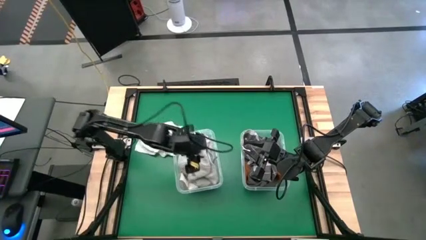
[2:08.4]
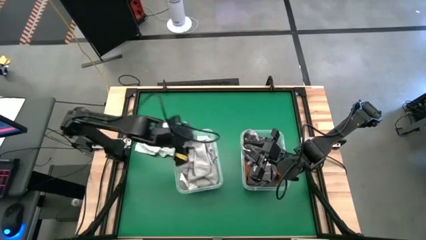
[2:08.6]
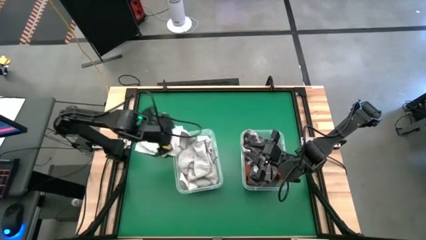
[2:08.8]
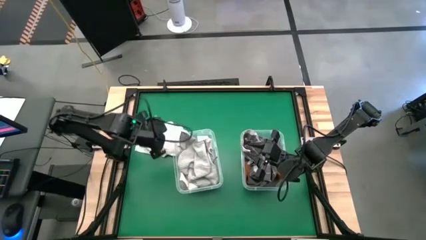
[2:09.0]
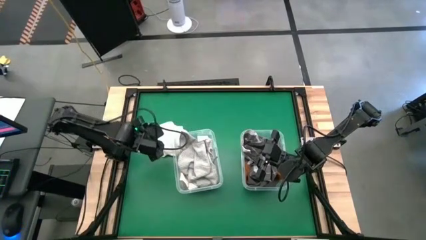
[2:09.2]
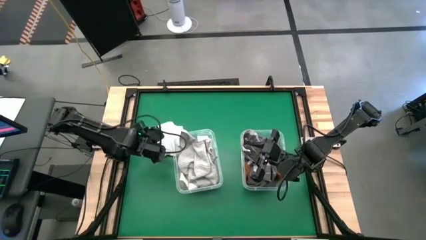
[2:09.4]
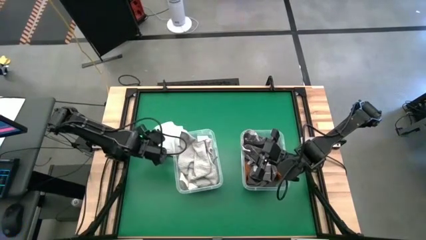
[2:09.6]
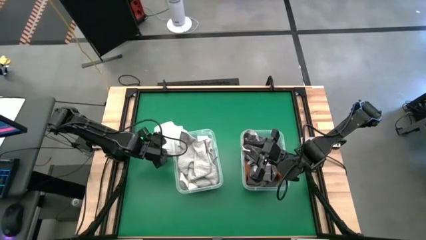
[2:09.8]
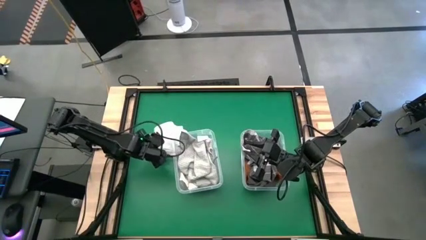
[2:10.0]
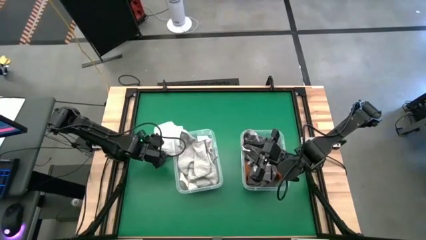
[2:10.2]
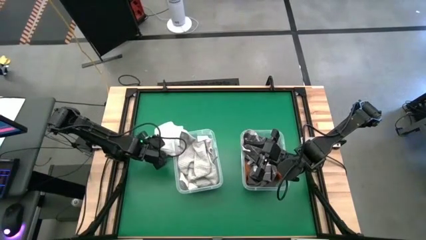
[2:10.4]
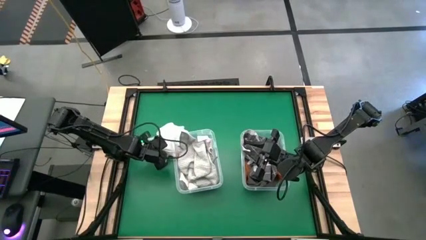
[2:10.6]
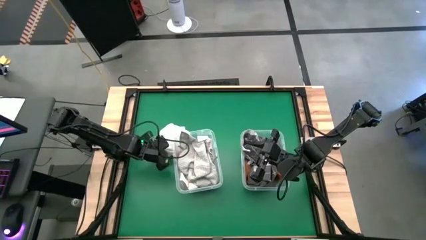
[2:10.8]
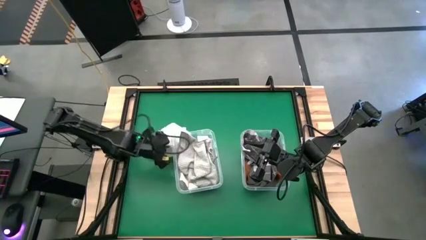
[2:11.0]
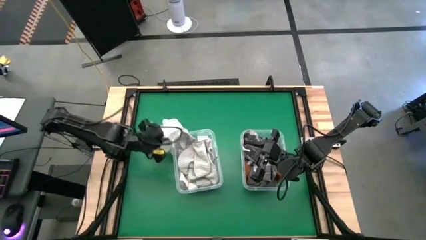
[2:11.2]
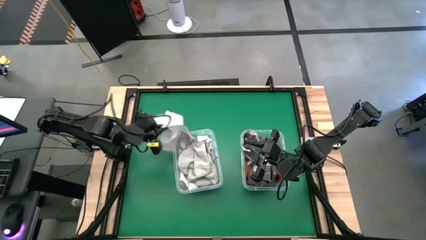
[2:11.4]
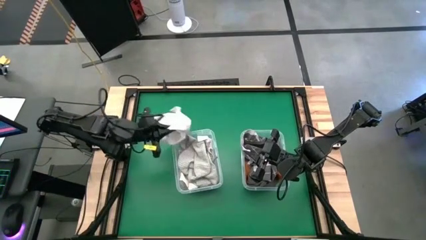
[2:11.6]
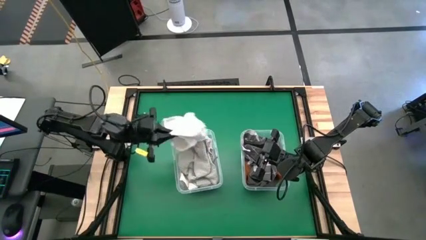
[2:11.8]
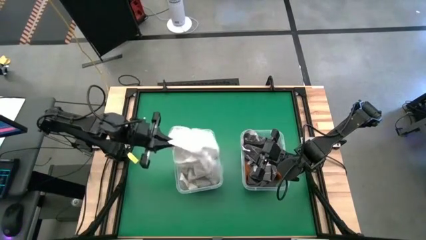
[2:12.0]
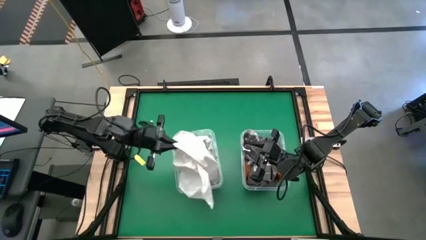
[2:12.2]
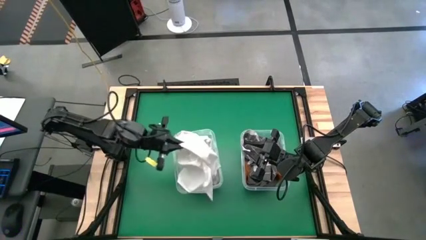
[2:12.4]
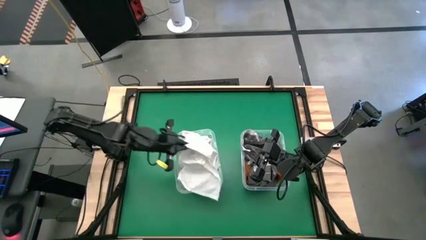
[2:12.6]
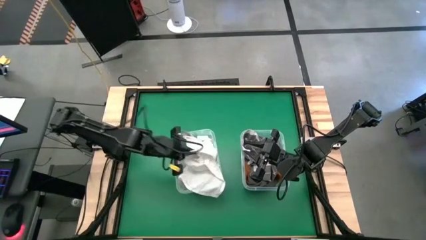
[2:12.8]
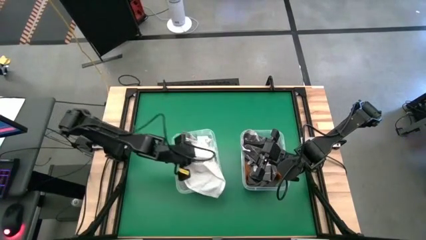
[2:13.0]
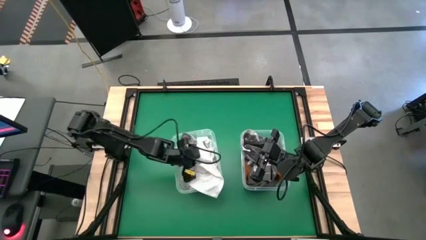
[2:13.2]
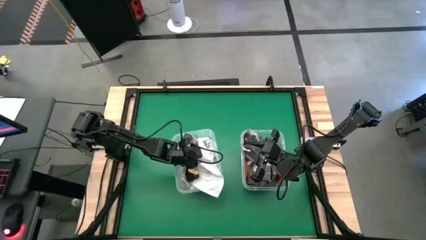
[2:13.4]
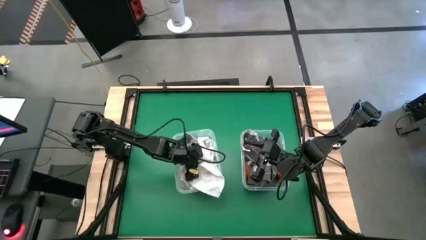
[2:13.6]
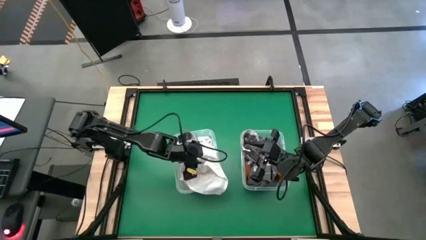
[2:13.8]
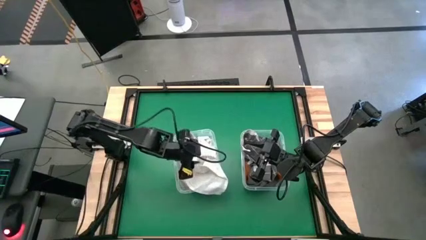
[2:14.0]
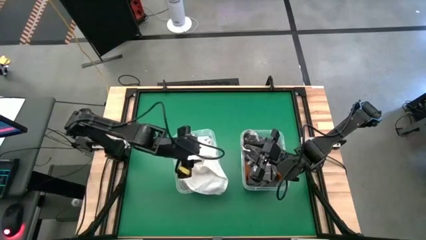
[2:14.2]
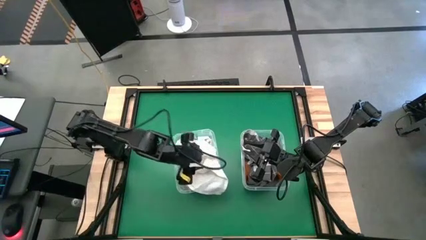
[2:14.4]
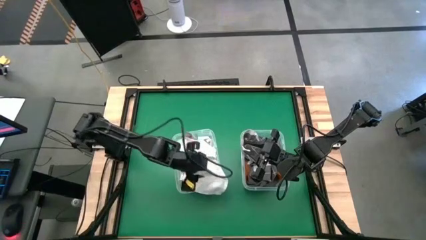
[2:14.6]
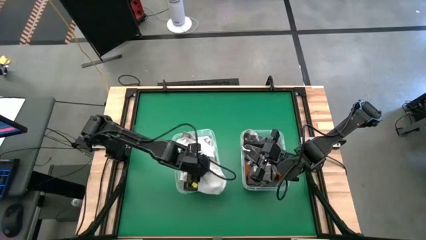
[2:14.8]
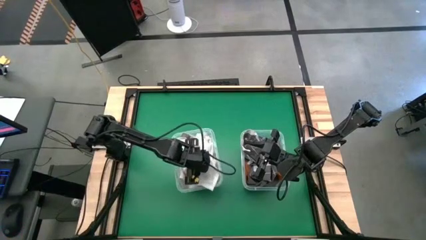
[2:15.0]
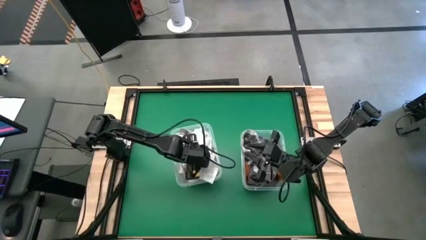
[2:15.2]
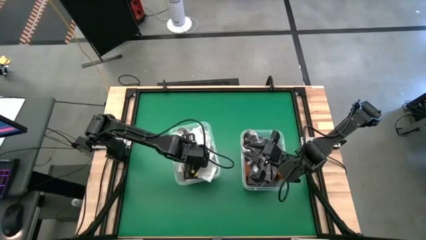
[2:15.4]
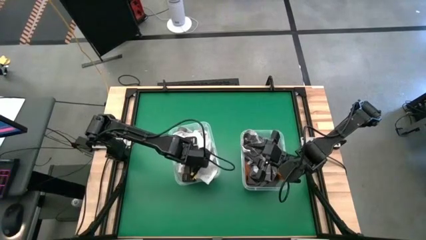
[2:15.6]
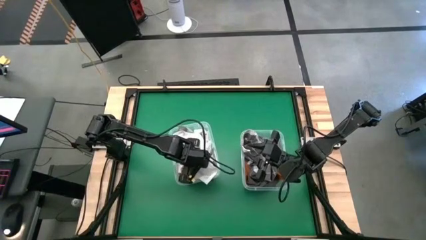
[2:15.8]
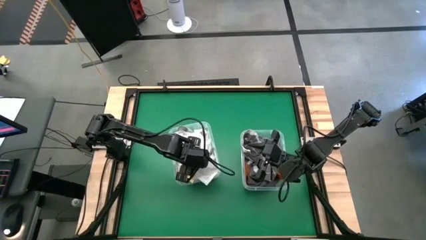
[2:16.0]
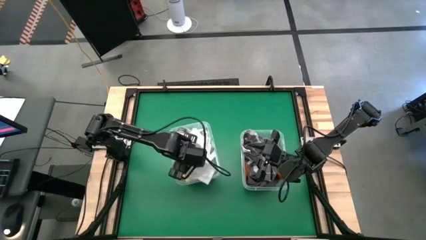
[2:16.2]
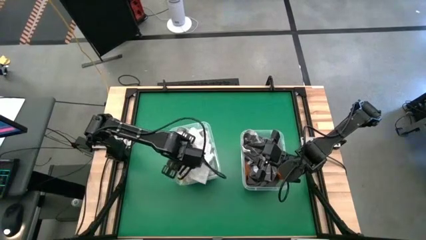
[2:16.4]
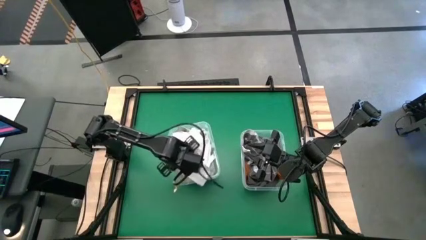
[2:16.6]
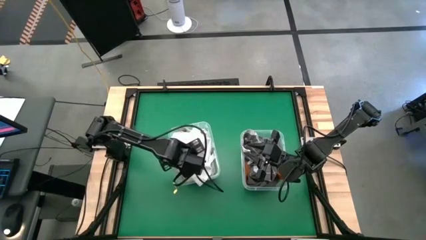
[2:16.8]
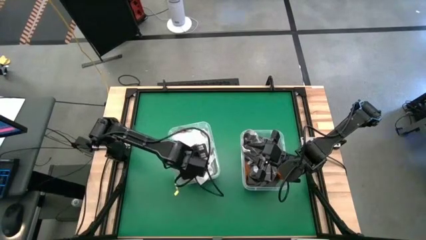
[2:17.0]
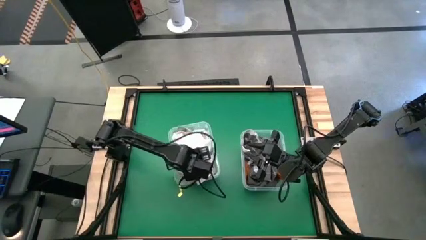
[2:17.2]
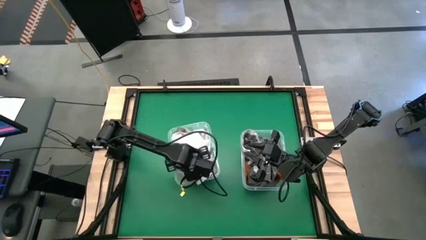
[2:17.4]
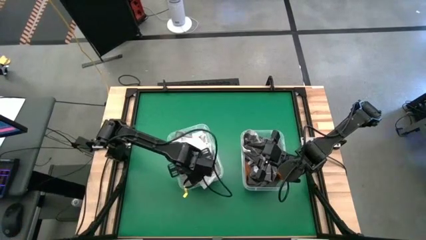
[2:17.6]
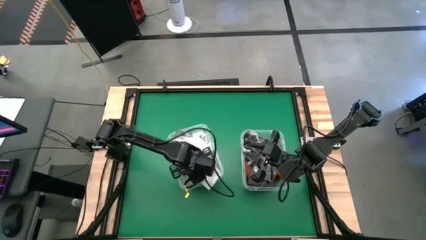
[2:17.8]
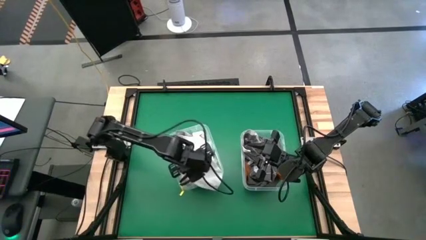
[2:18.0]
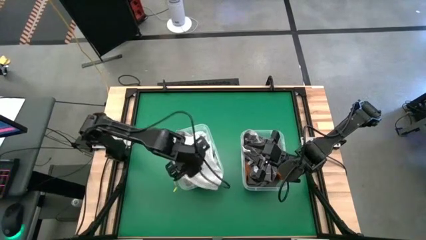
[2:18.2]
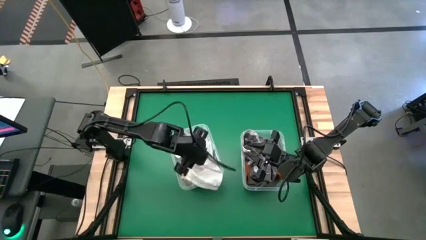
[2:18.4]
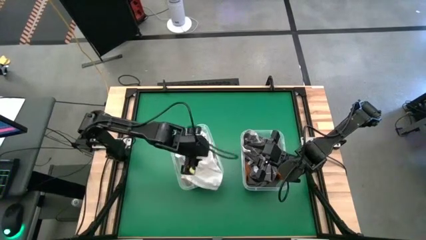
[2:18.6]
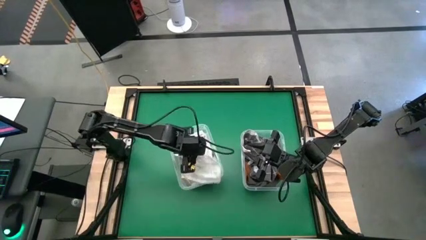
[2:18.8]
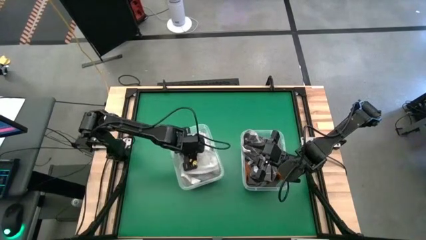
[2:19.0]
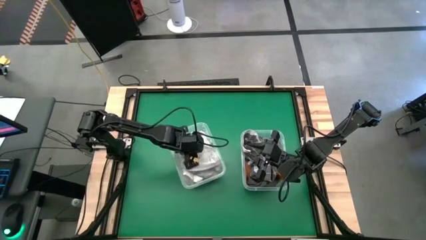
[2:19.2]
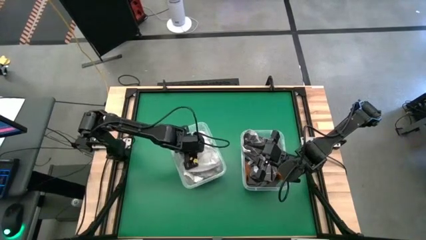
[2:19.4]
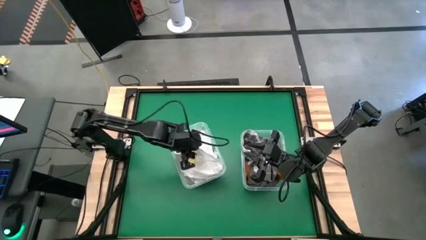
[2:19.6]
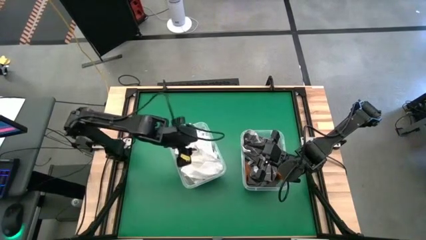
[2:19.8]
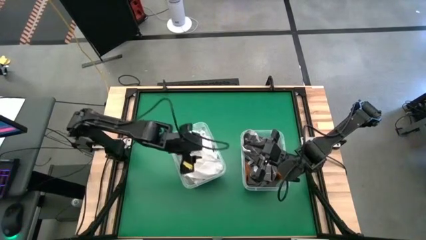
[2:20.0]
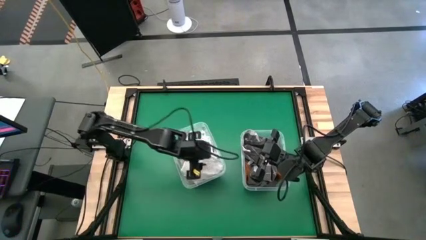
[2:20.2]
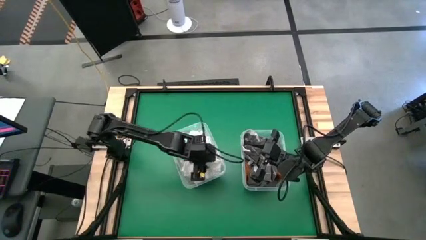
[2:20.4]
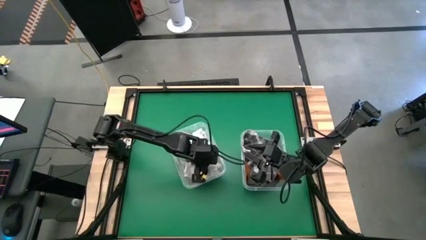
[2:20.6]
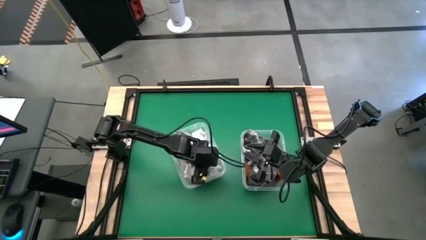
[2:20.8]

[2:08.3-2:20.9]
Task: Sort microfiber towel by color & place in baskets
Put the white microfiber towel into the left transparent bin
